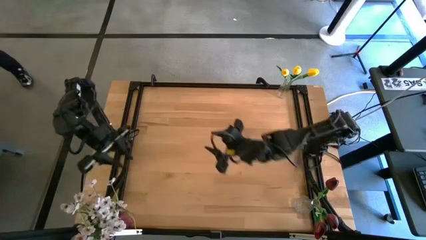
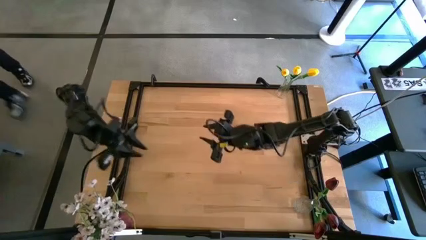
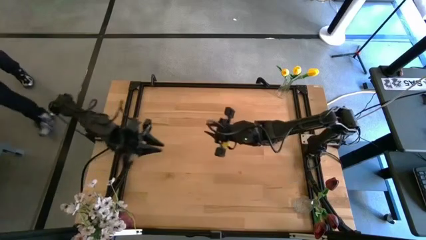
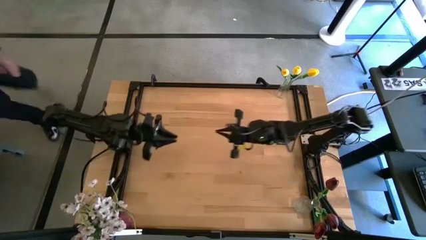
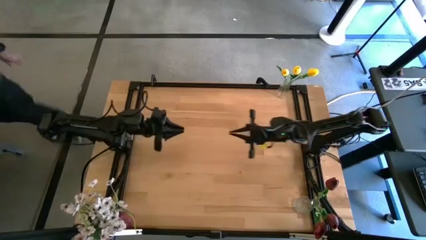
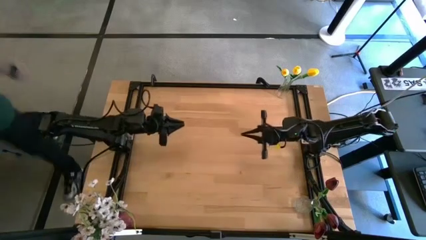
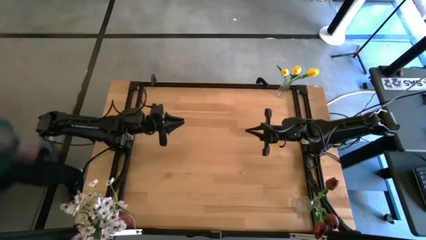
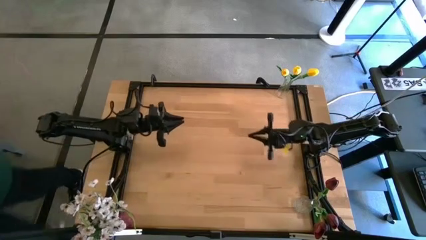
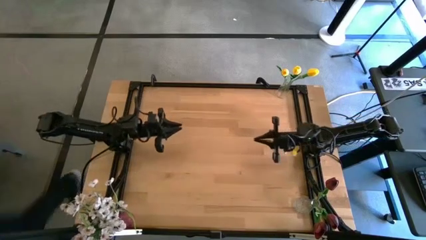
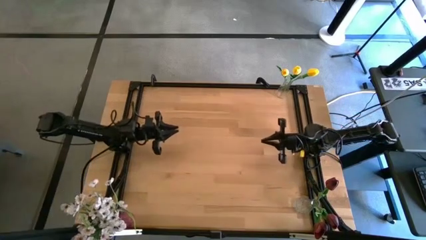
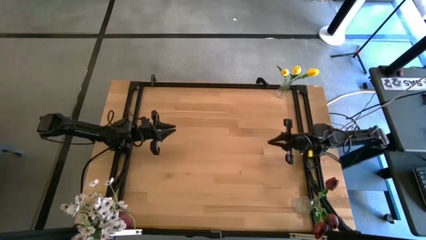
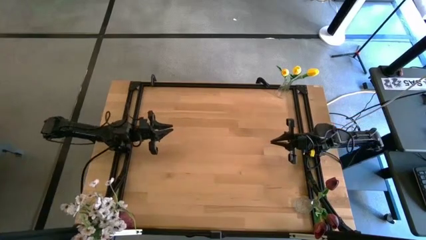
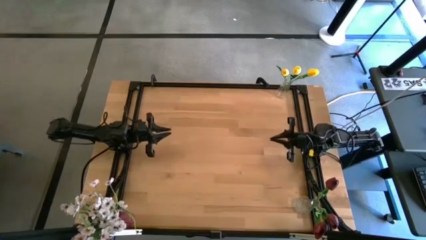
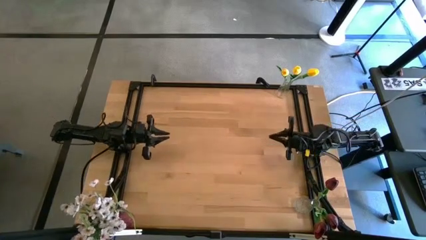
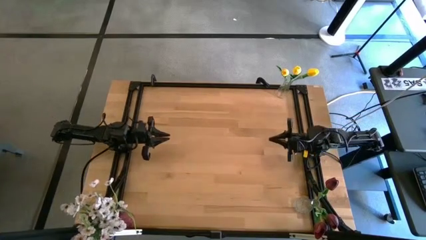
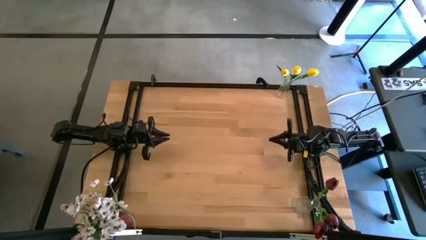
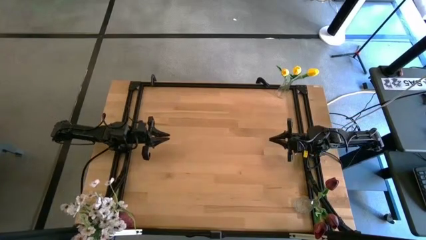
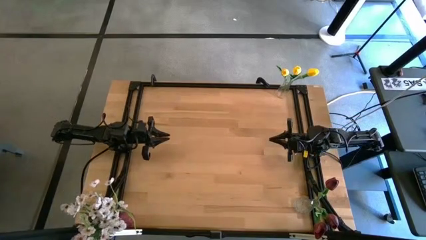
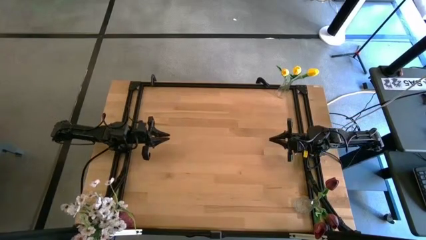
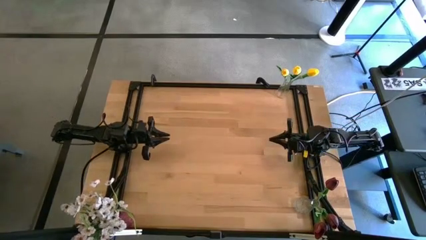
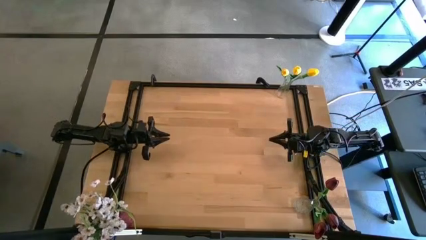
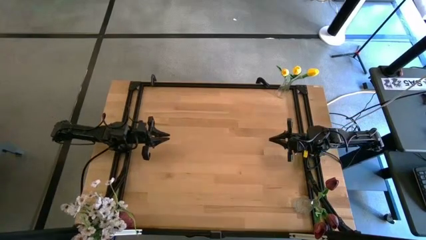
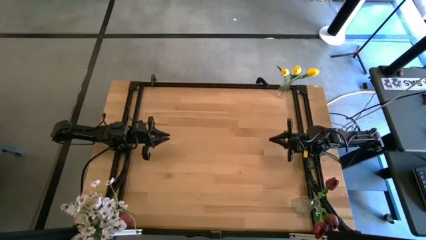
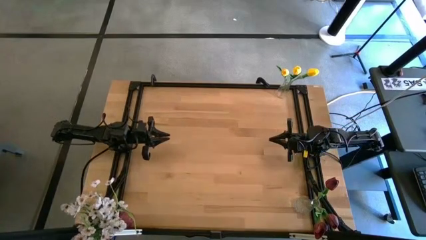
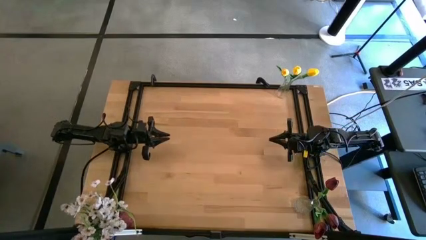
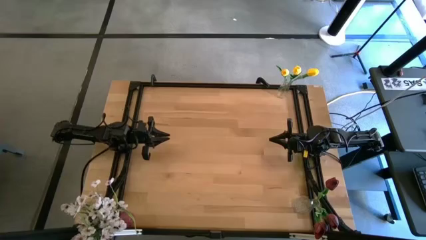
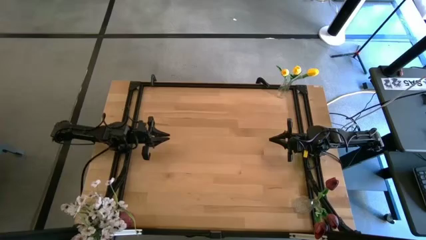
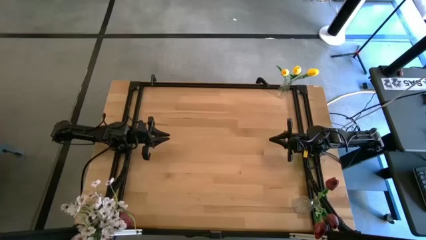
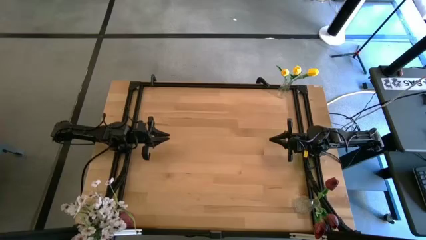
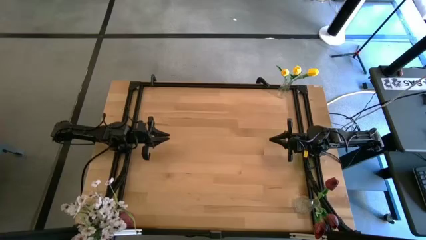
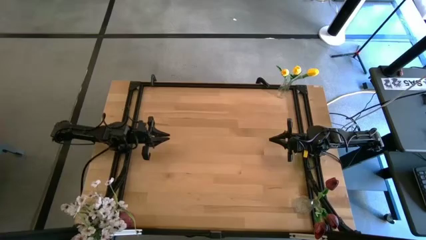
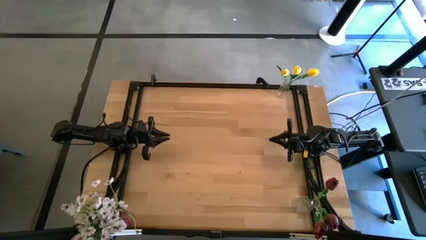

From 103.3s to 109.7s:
Task: Sort flowers into vase by color
Return to Home Position
